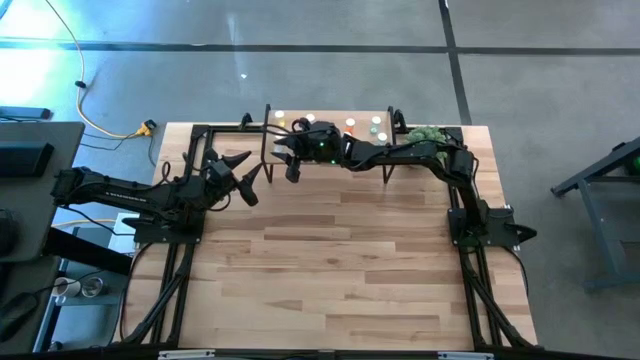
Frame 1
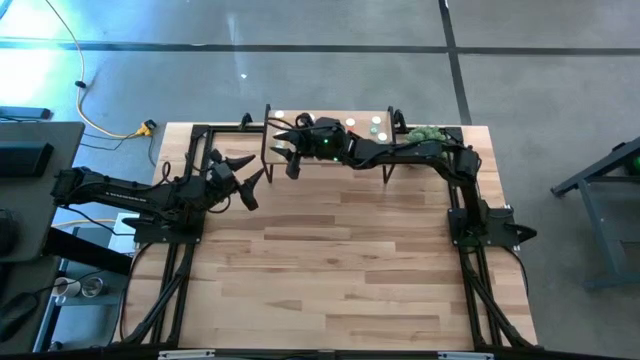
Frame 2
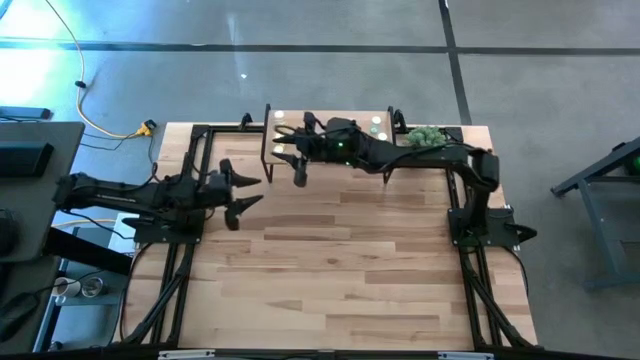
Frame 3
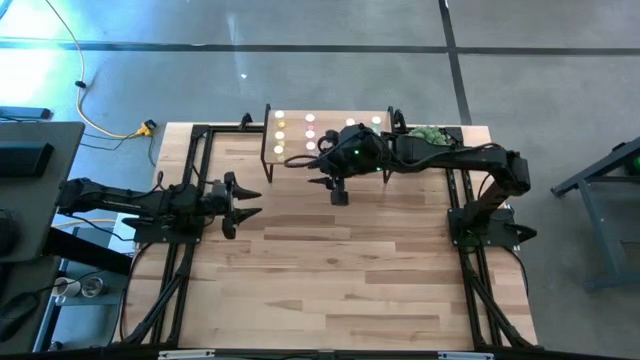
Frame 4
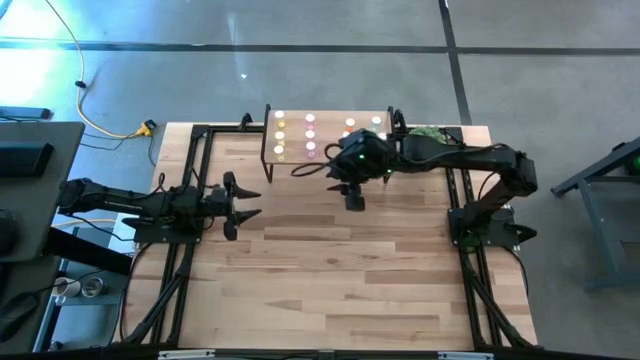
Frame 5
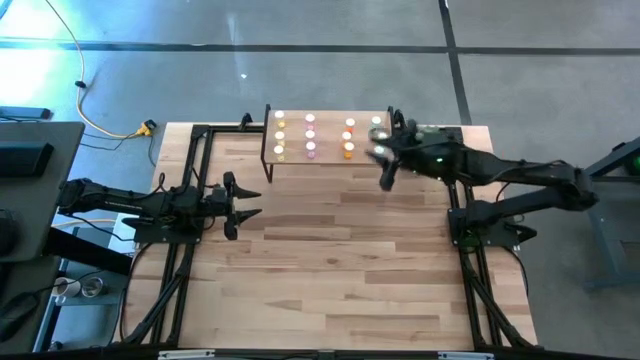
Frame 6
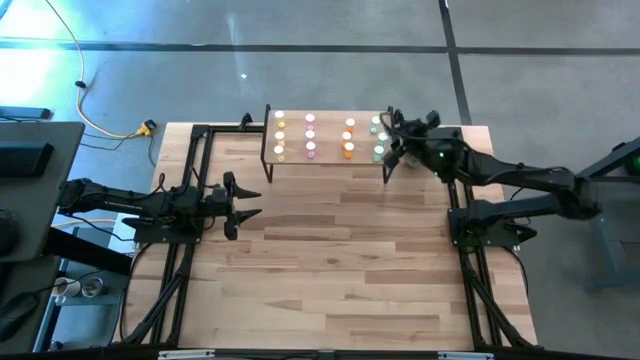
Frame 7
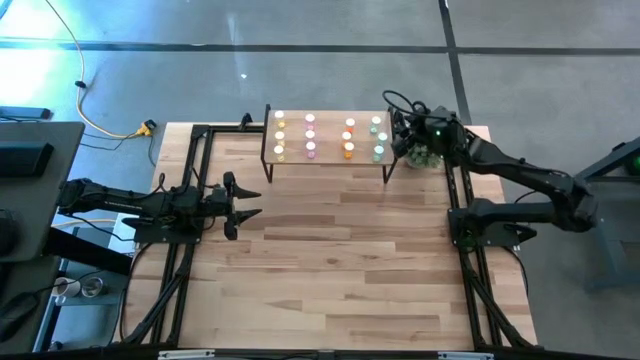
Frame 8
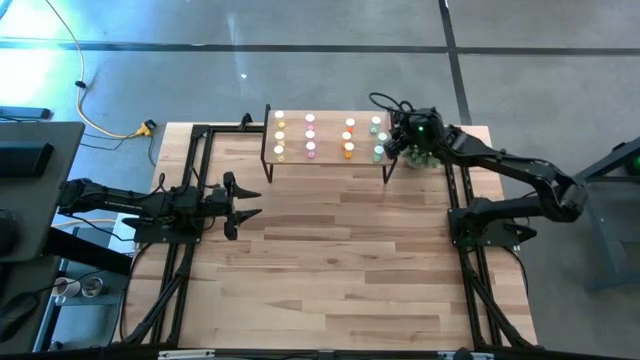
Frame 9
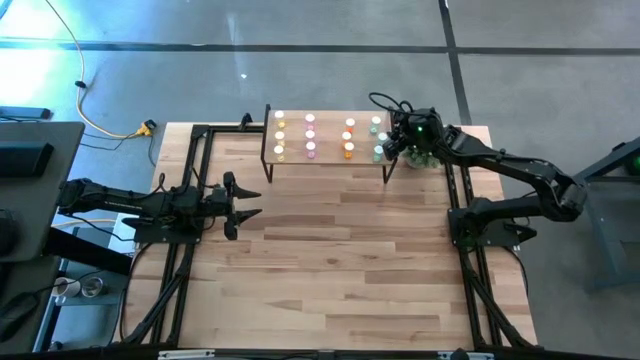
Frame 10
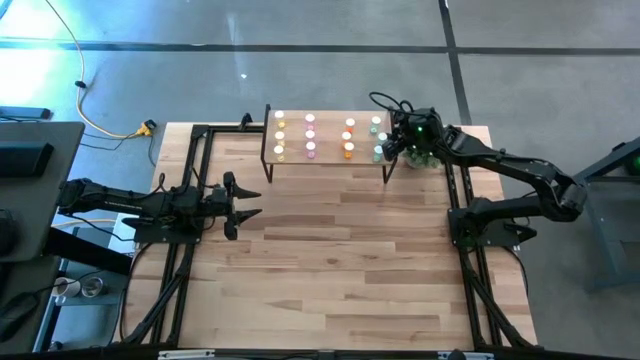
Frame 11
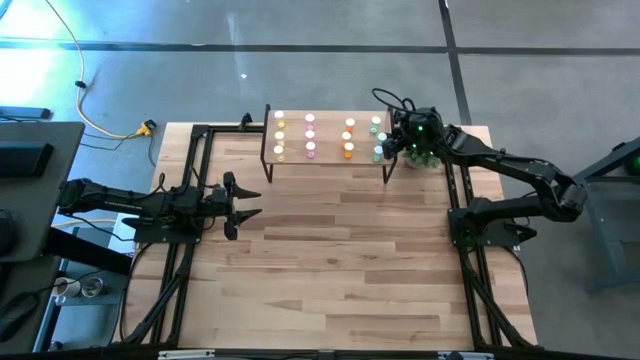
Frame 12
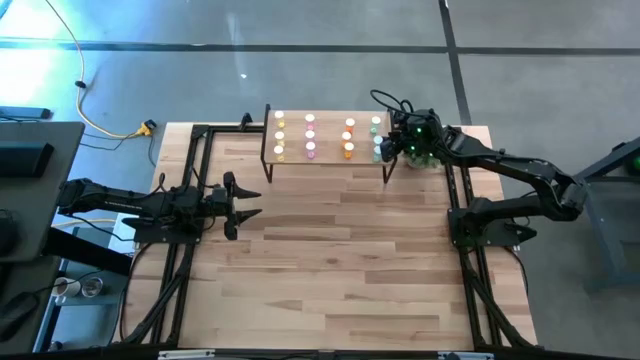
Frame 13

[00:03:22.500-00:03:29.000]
Task: Pick and place medicine bottles onto shelf by color
Adjust the blue pill bottle on the shelf

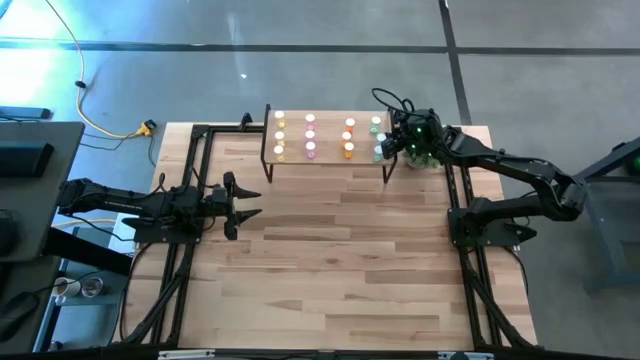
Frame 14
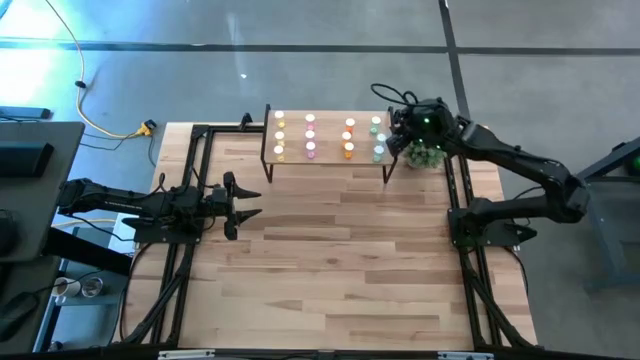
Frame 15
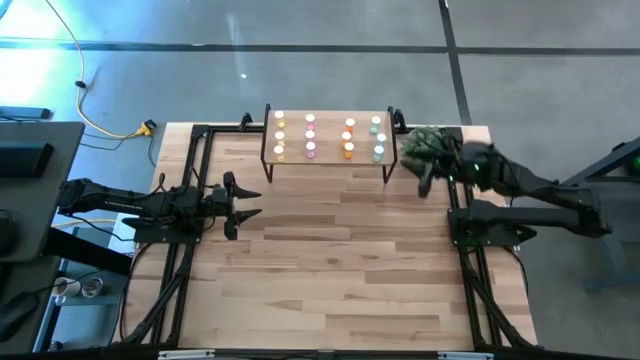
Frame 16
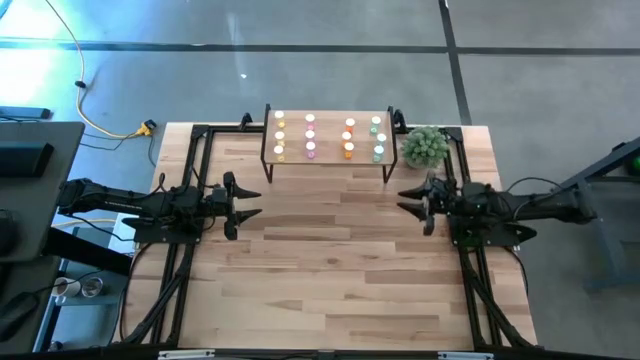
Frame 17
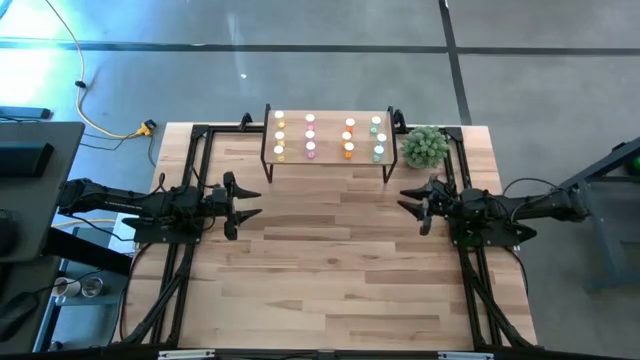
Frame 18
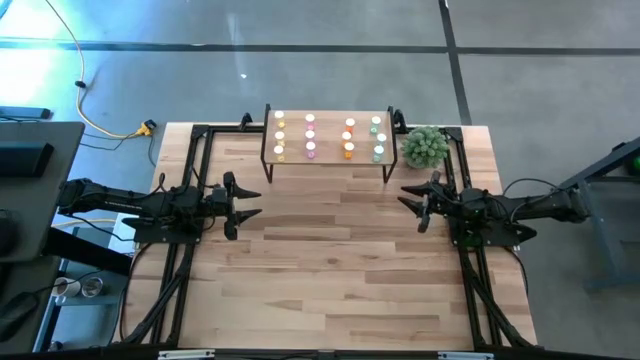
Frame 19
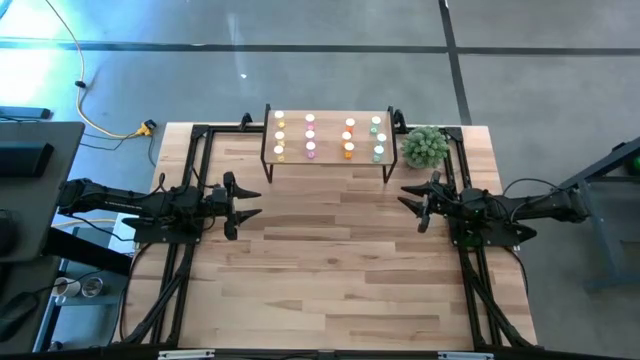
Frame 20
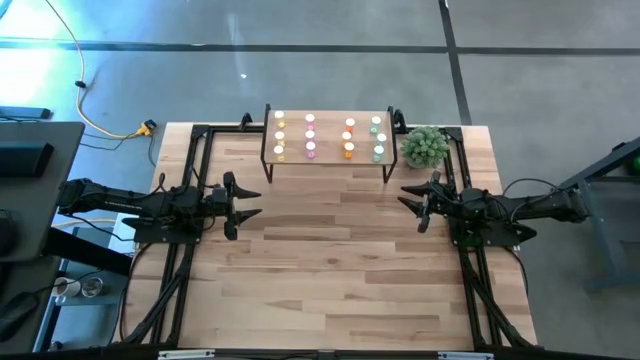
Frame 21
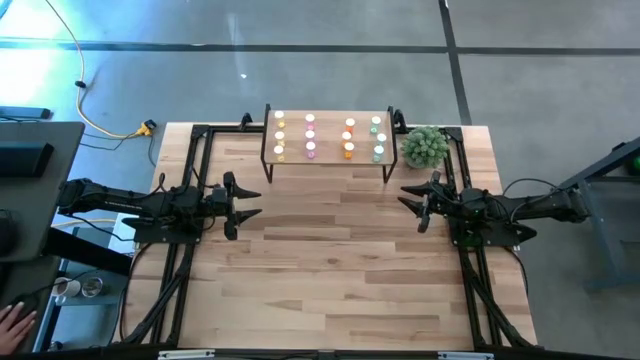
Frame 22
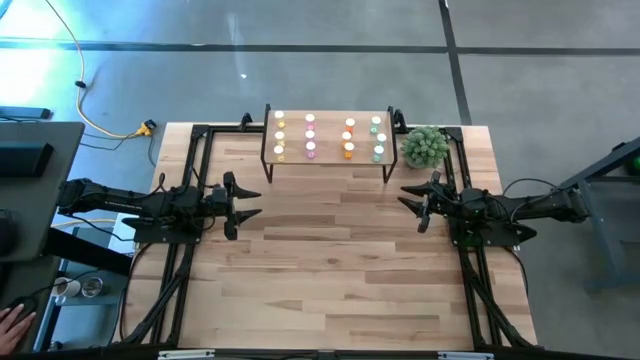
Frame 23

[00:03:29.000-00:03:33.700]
Return to Home Position

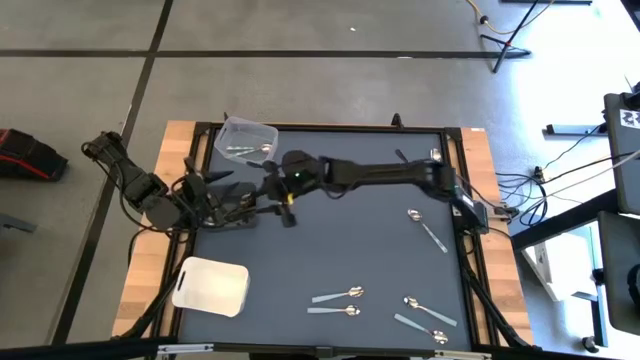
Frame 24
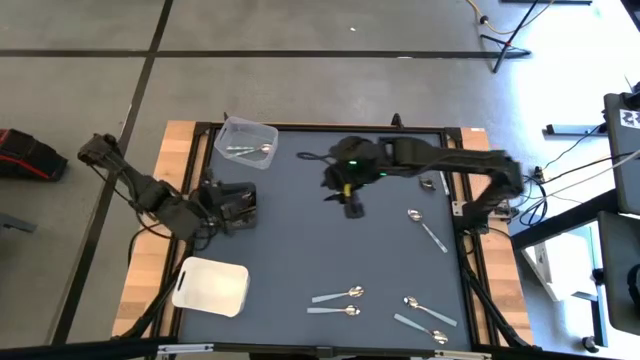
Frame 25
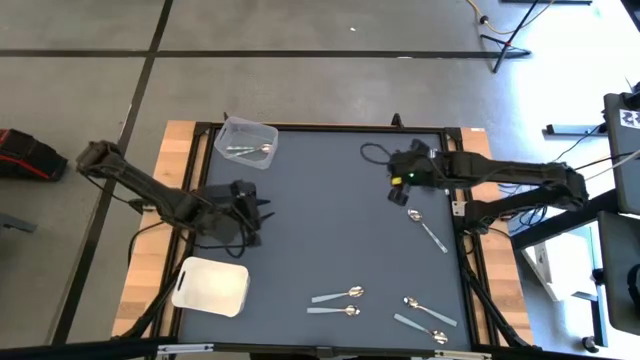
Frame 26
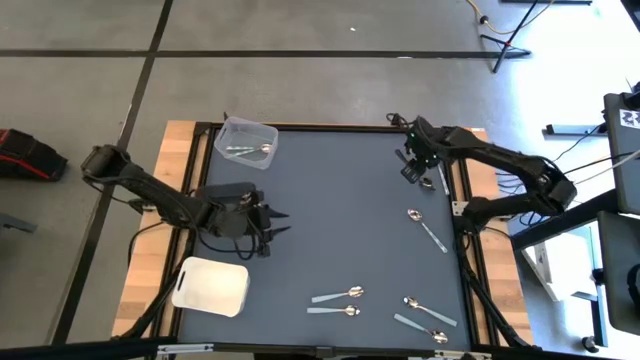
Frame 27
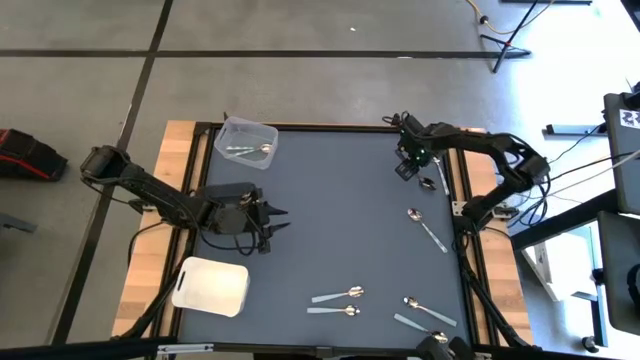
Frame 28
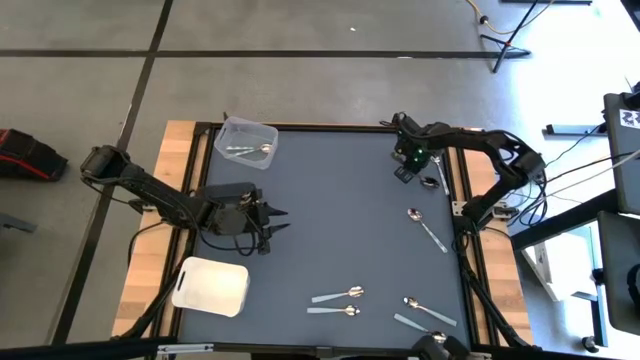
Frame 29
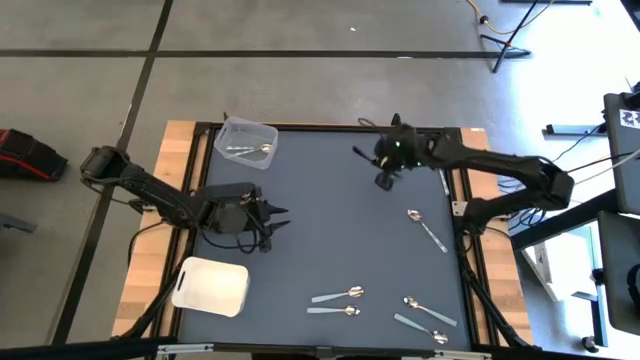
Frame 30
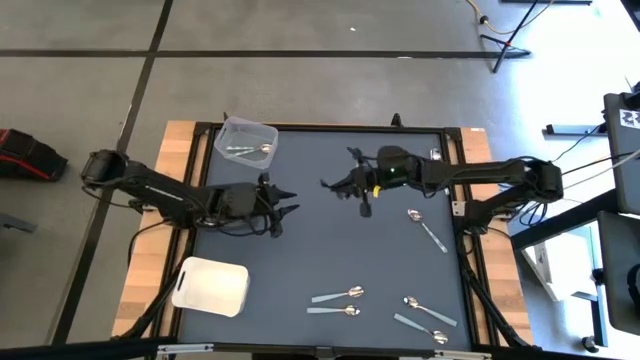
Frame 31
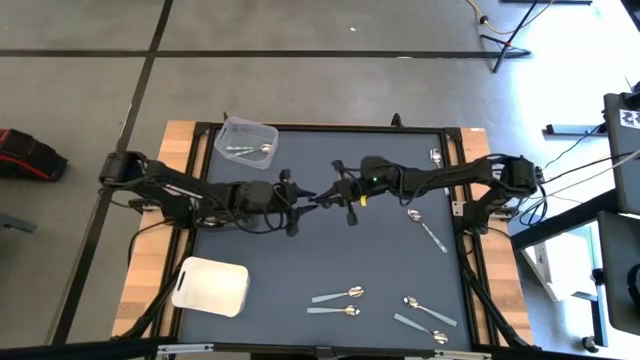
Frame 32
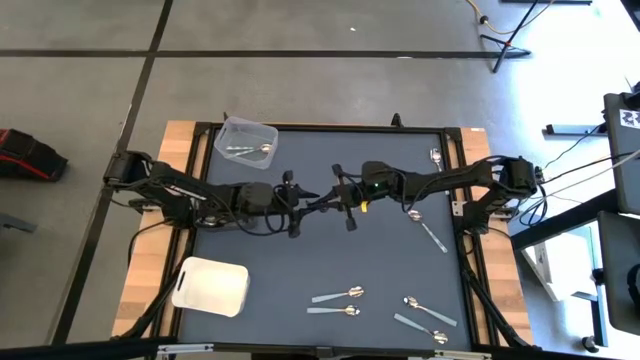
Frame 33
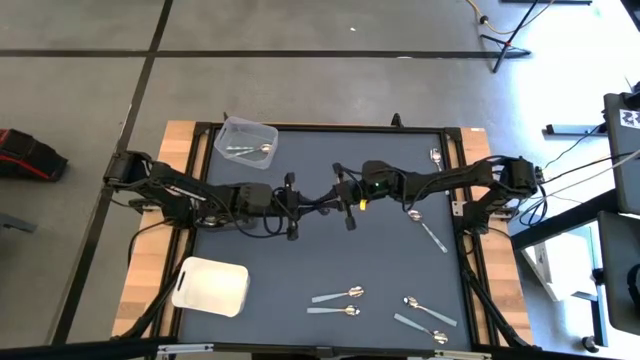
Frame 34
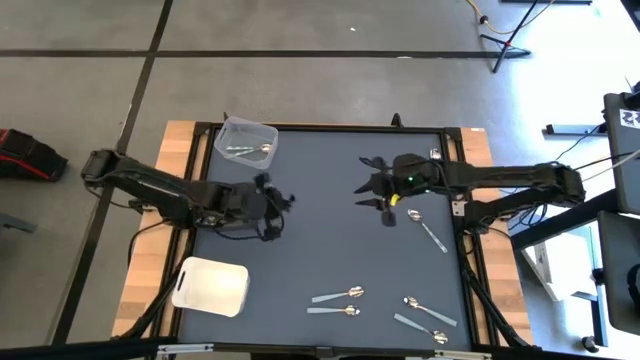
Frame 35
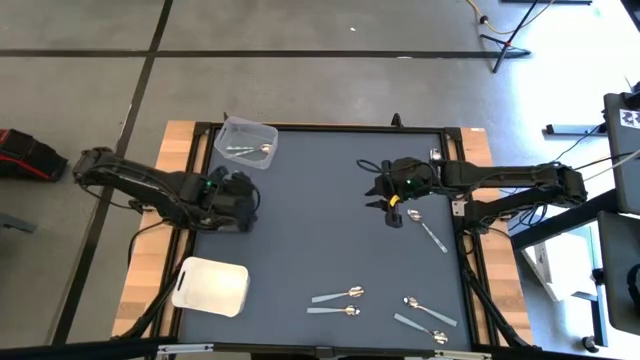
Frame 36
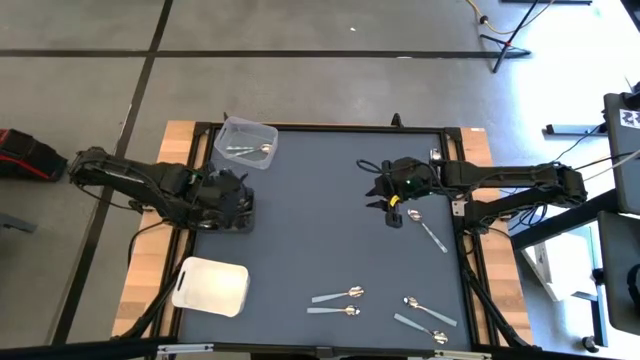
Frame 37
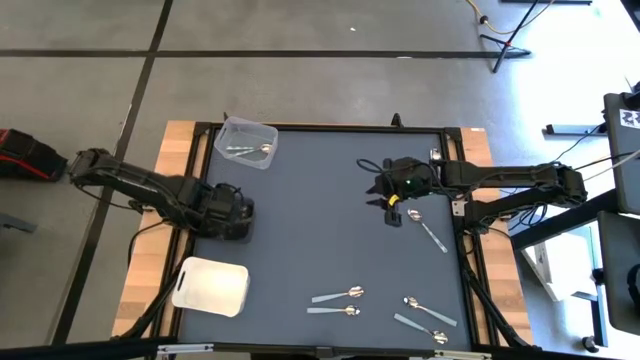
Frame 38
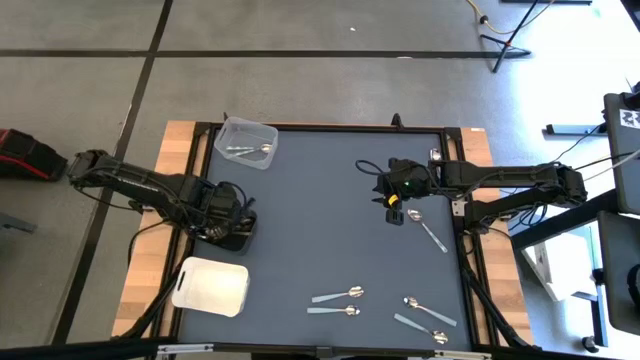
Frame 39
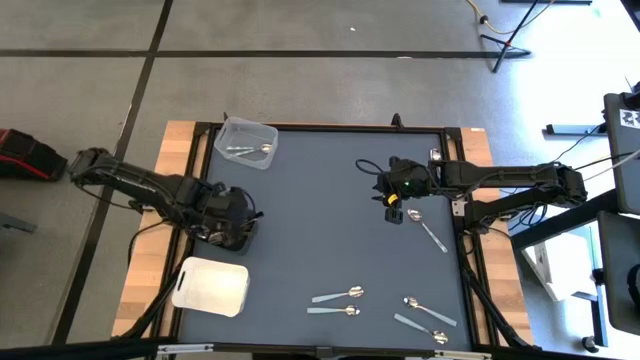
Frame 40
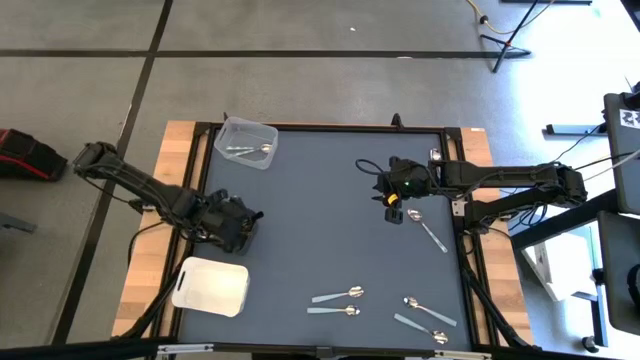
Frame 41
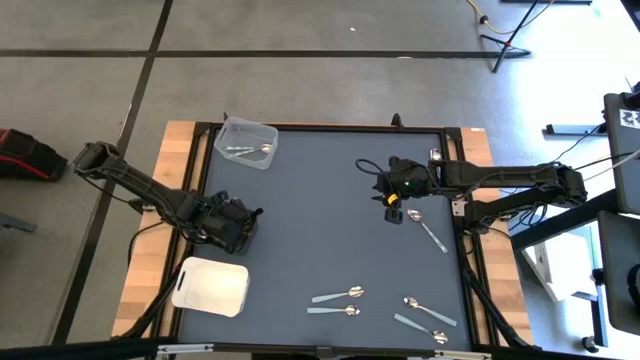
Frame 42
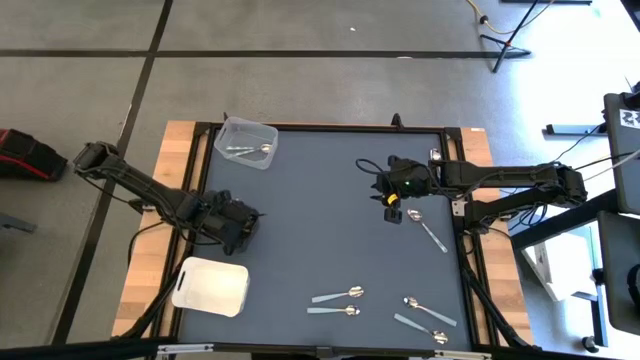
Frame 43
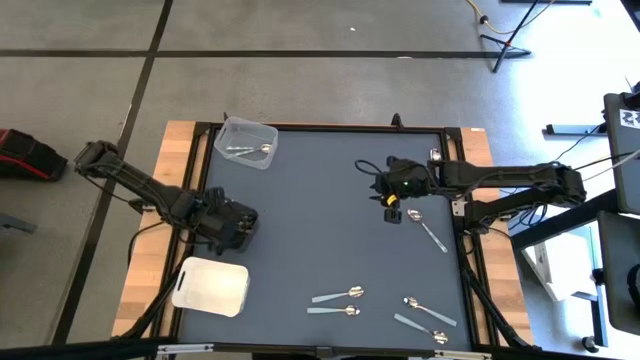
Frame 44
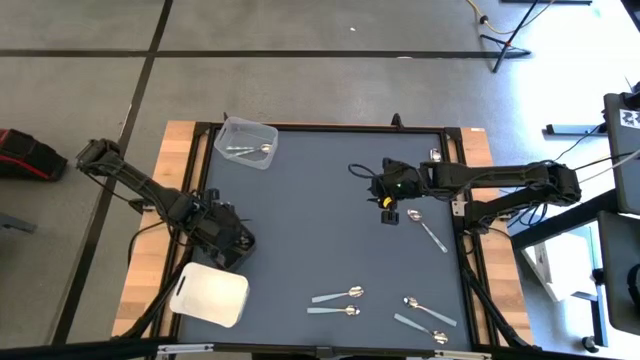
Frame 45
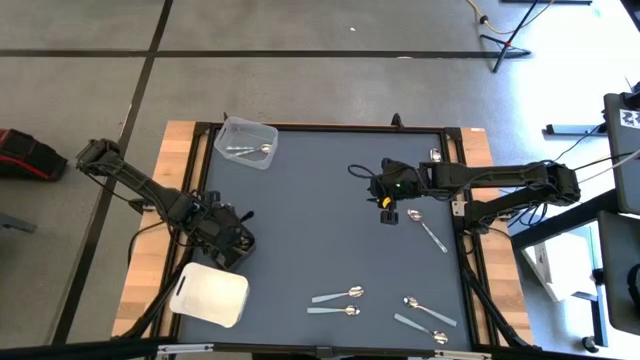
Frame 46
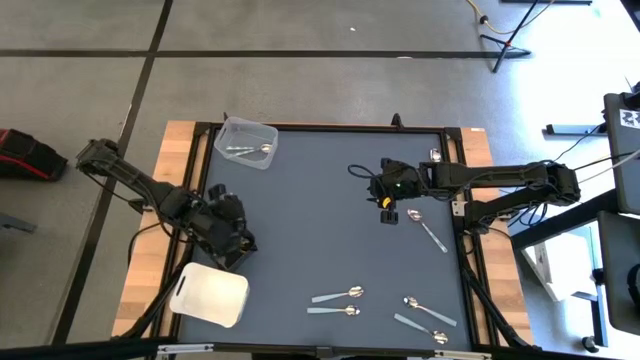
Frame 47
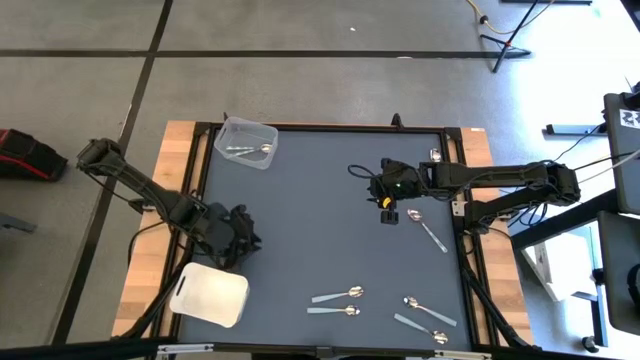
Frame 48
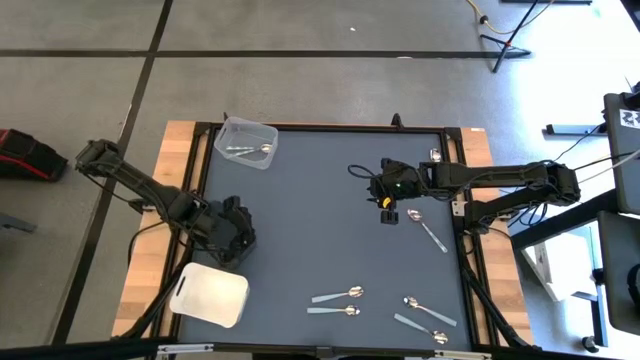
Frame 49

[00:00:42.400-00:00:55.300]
Task: Sort silverware by color (type)
Put the black spoon into the black bin
